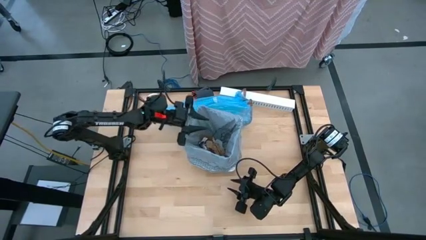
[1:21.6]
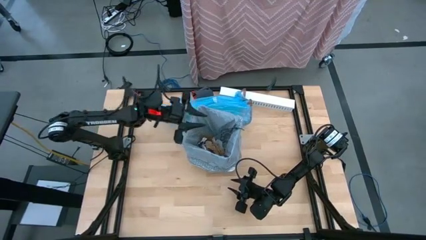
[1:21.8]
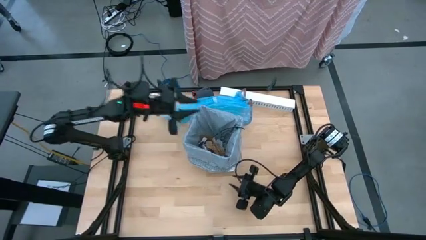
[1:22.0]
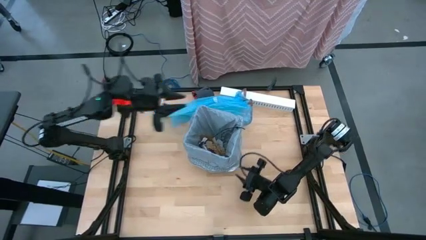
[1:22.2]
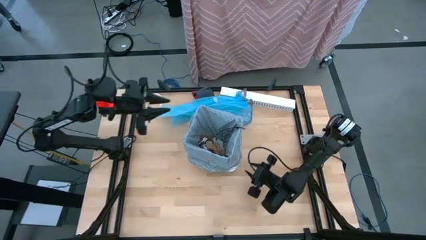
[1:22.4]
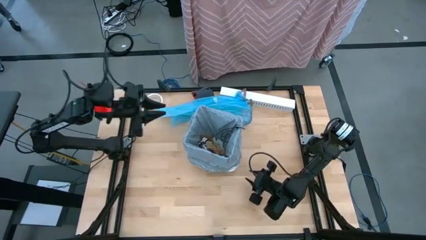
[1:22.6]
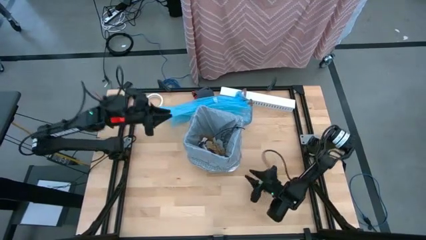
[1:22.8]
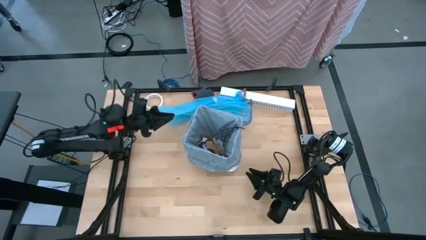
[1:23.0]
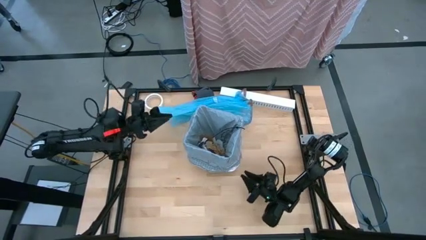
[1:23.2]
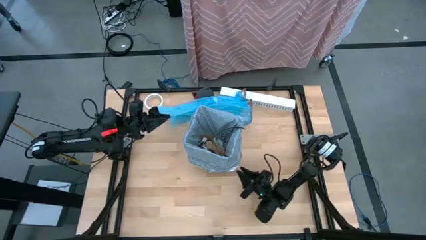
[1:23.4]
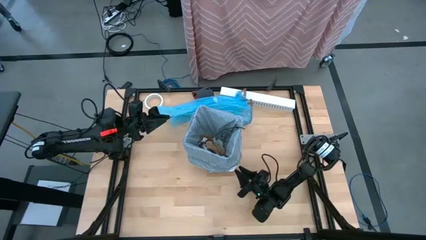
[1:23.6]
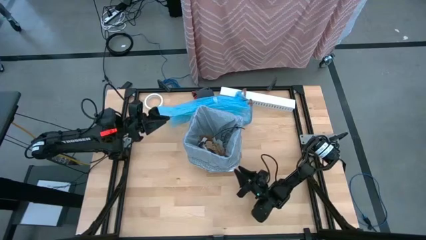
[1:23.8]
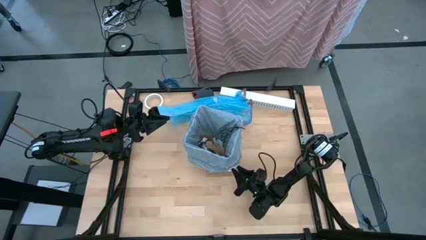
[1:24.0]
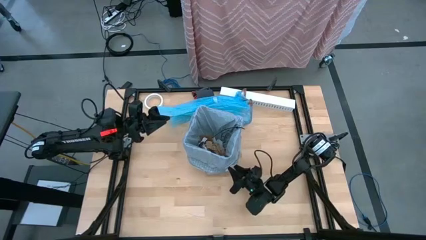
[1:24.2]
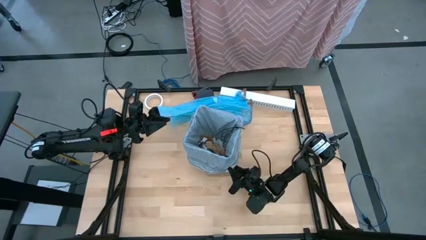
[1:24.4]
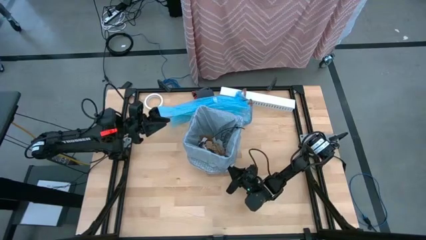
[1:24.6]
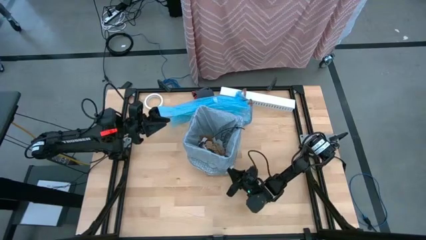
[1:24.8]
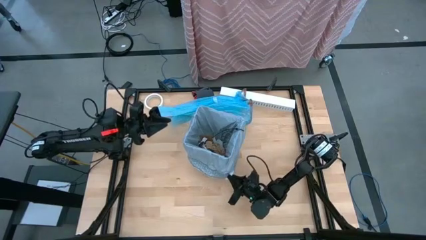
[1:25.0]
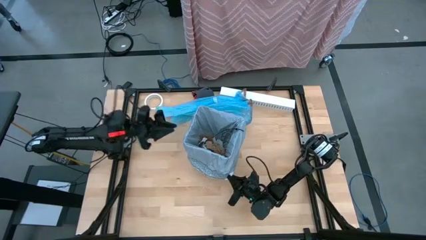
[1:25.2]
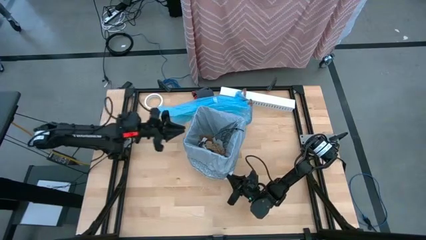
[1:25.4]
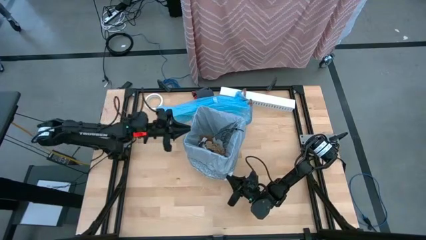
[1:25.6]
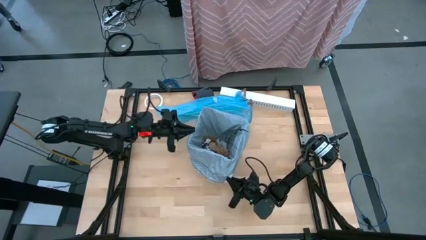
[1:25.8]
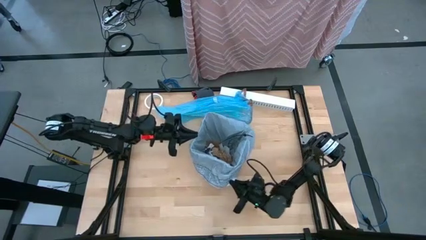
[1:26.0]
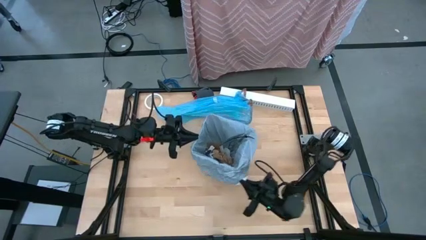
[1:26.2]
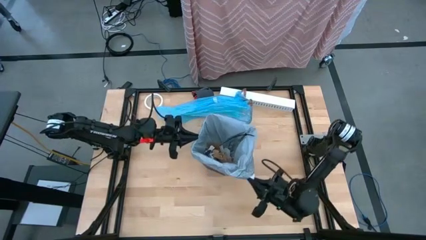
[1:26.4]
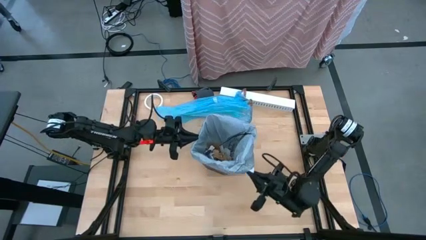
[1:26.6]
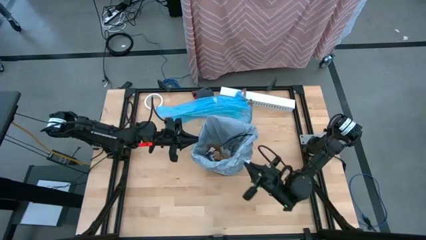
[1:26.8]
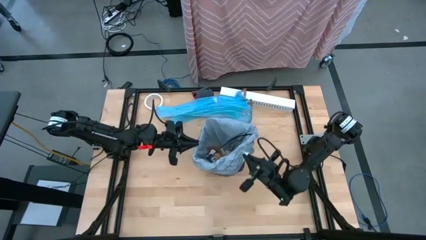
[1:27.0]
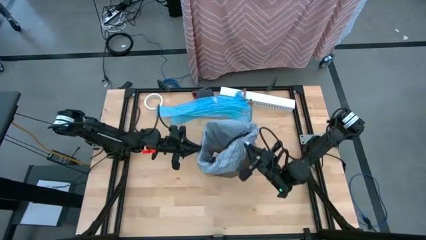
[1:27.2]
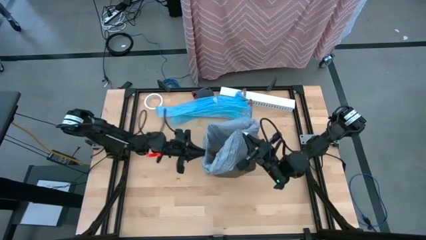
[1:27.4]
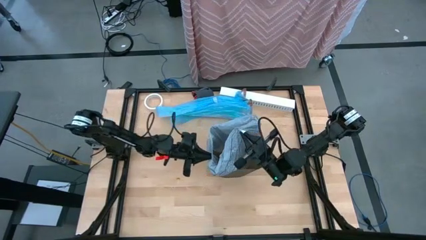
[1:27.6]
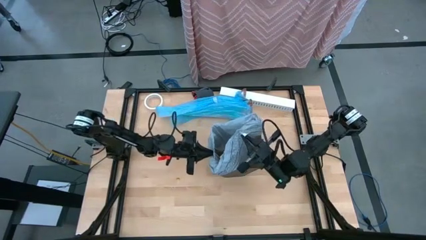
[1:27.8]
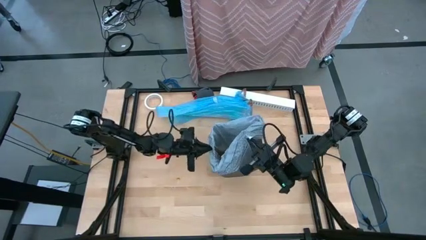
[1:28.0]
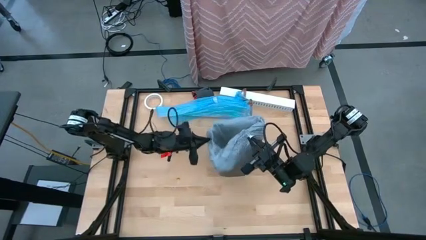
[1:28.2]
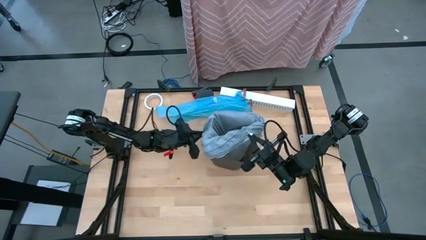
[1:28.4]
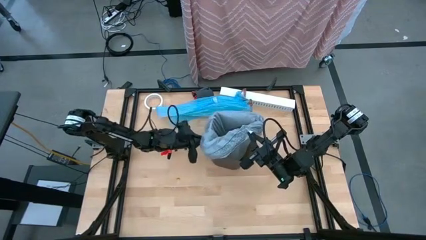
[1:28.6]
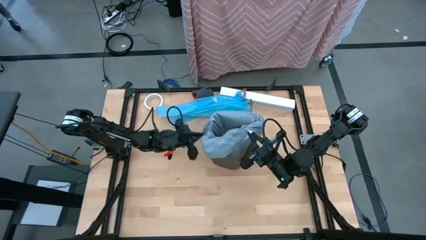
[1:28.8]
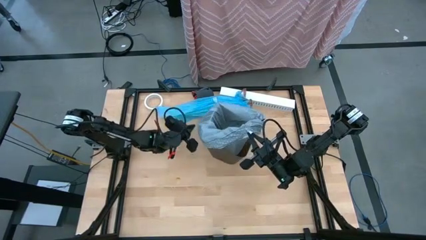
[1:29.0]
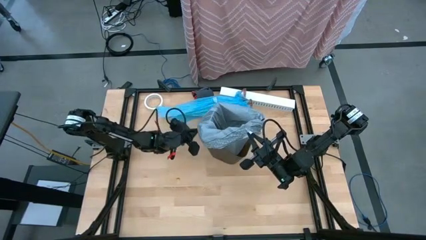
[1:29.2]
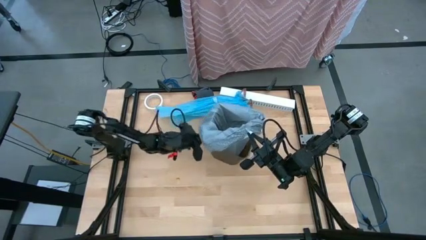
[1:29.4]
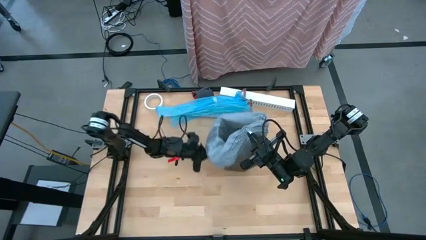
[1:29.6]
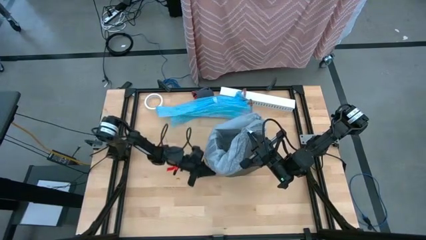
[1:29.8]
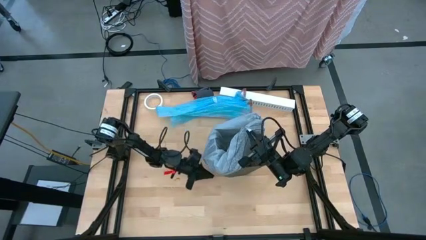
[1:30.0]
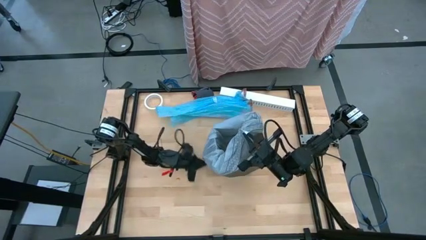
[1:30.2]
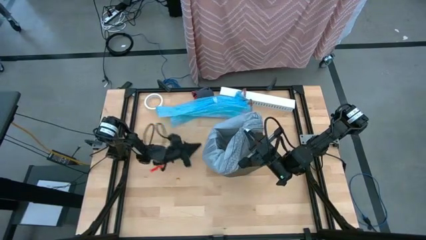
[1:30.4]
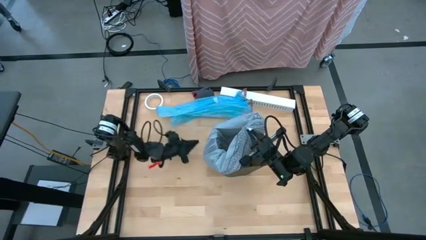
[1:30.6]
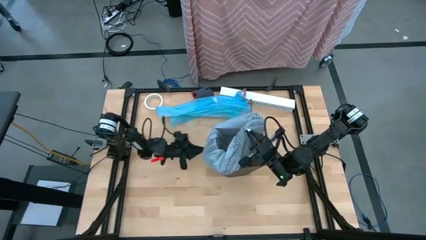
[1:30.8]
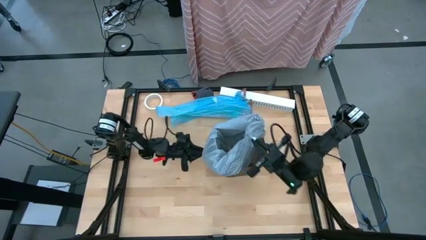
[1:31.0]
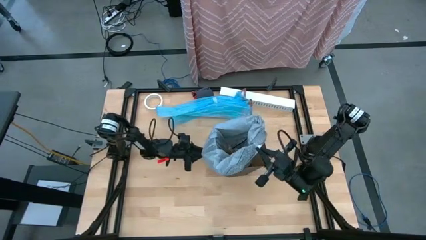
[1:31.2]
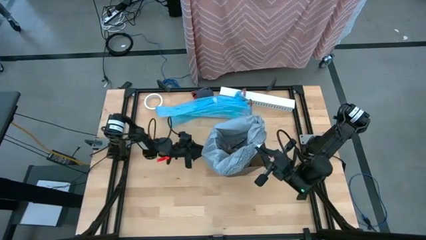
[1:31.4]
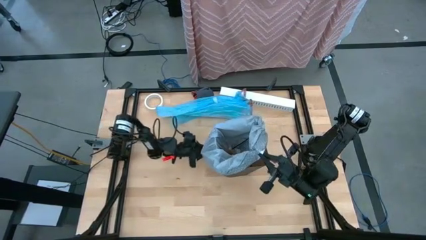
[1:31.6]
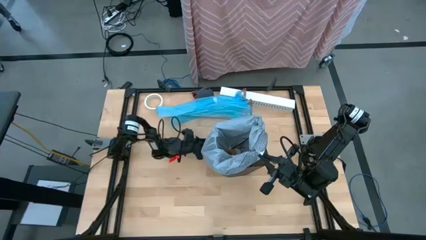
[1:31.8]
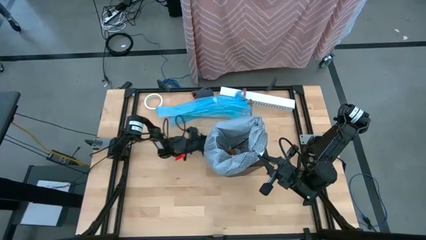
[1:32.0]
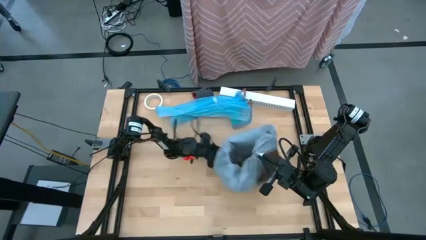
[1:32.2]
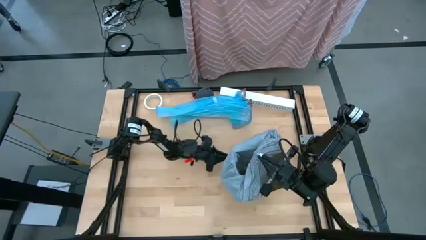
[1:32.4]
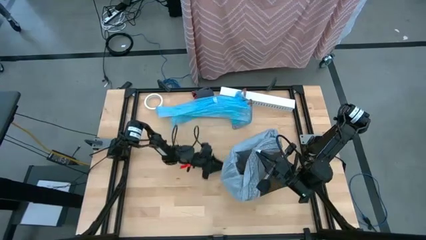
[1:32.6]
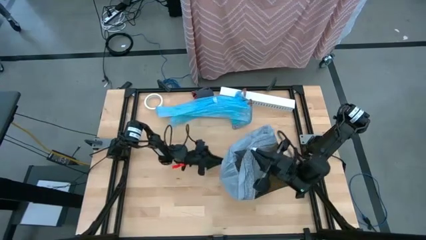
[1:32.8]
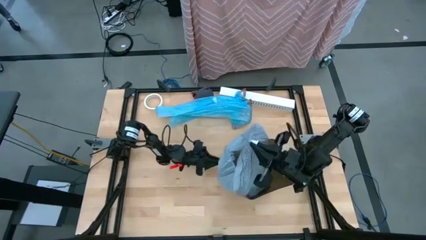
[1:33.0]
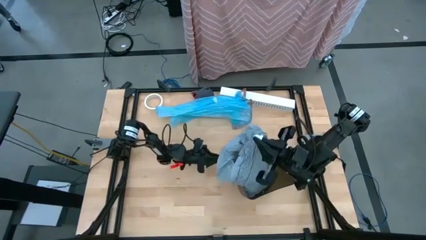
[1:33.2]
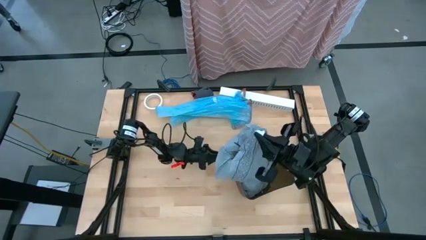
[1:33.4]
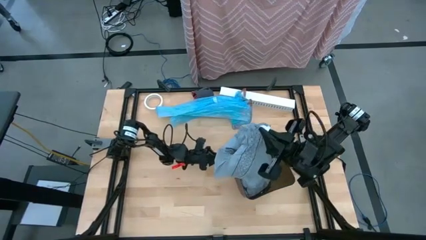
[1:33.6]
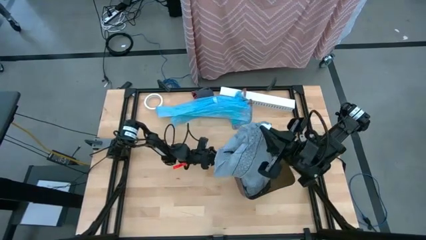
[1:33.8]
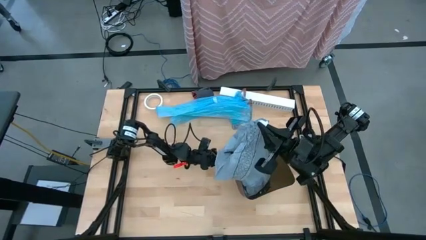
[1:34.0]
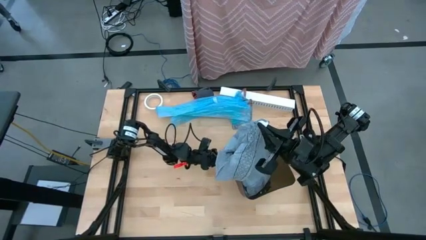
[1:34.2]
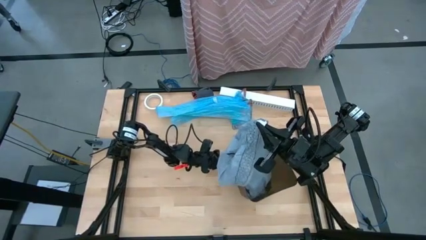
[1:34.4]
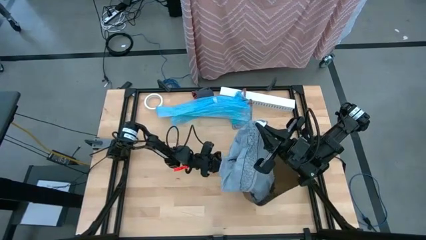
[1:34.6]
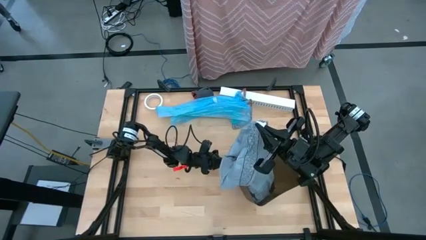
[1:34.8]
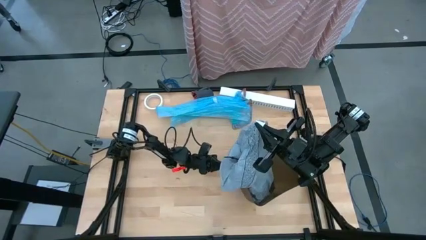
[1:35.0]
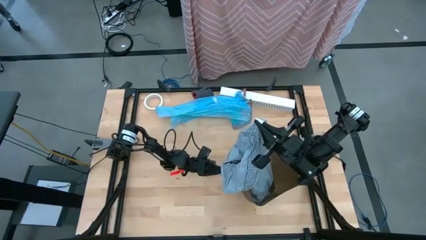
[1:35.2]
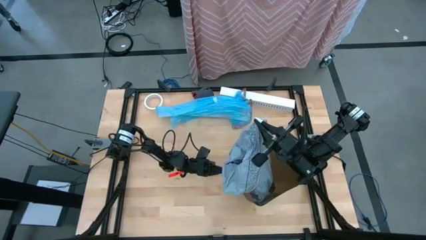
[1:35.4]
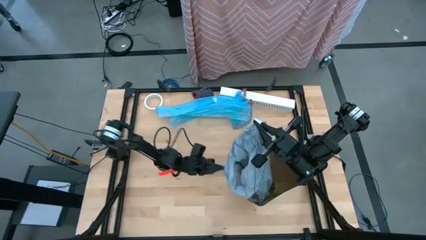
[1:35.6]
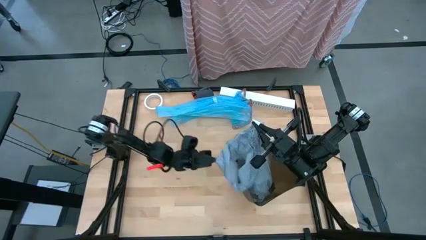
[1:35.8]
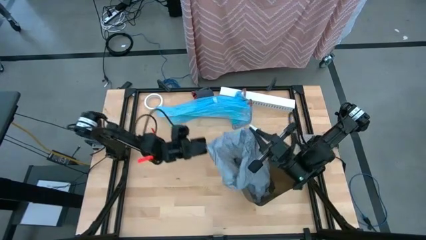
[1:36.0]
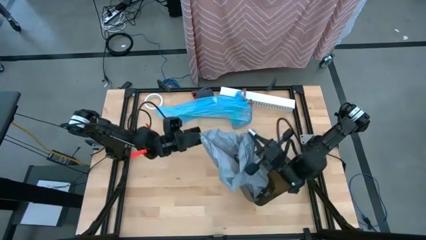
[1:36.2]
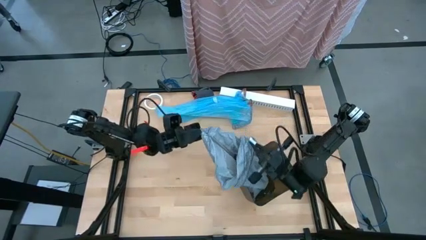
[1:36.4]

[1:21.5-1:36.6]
Task: place trash/remove bag and relplace
Remove the blue trash bag from the black trash bin using the drawstring
